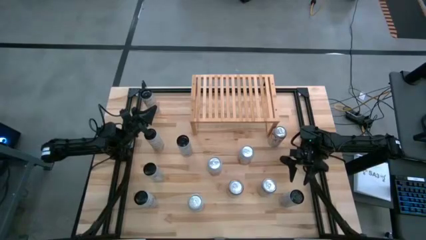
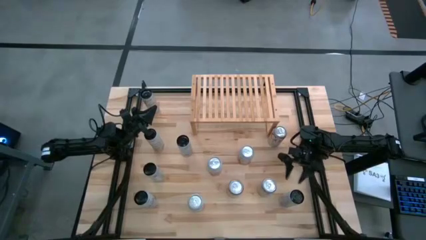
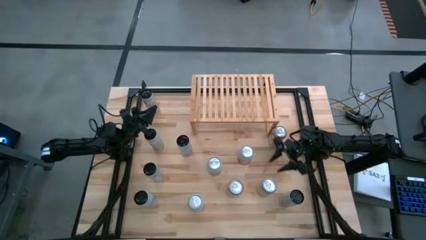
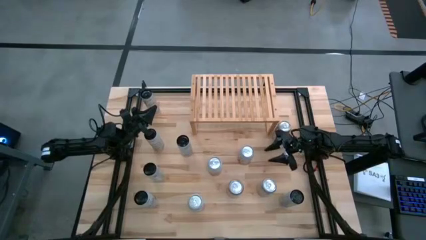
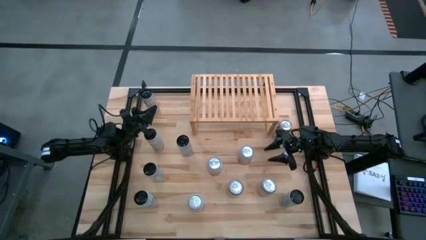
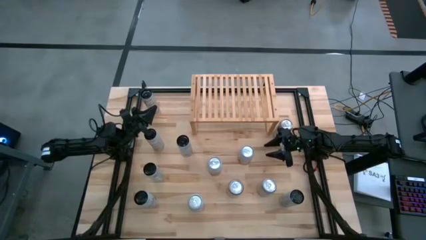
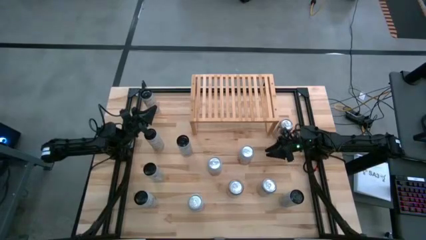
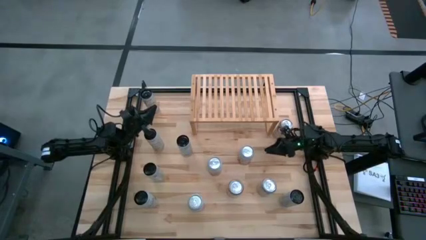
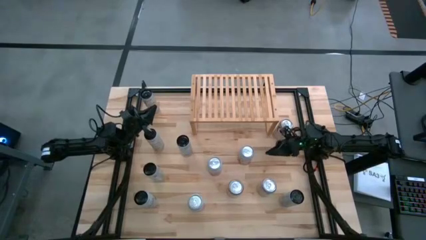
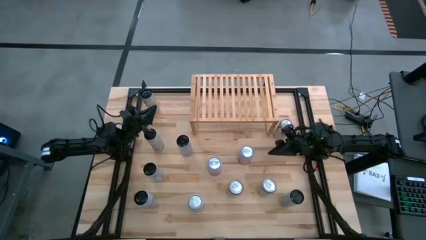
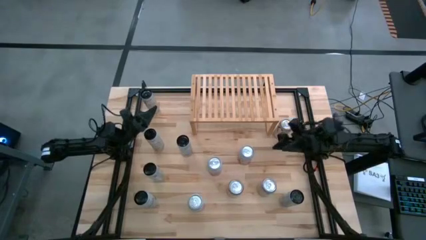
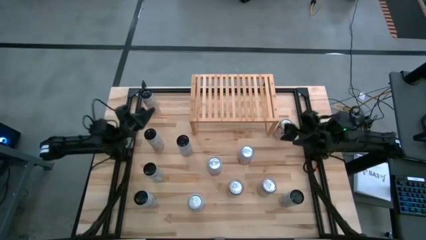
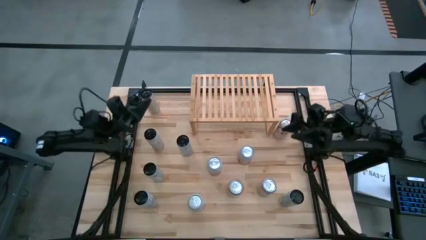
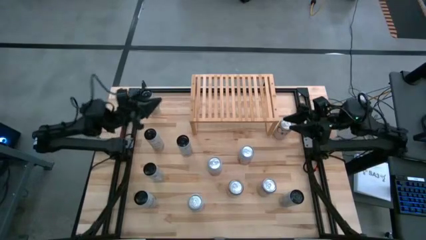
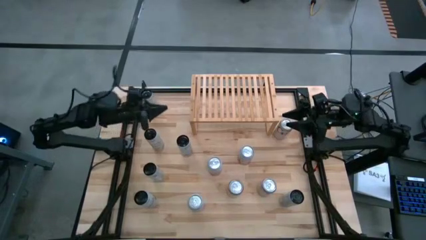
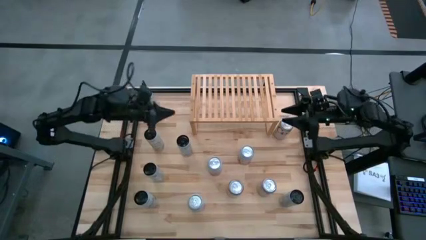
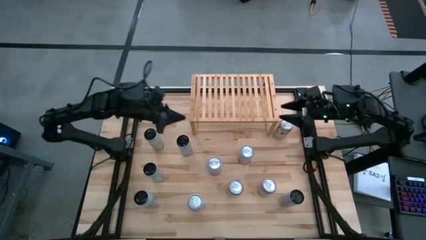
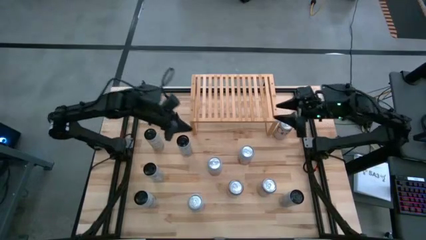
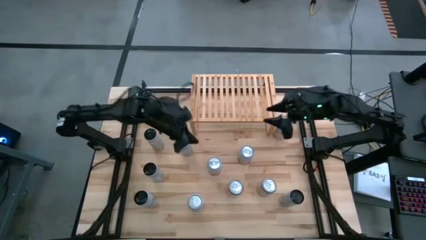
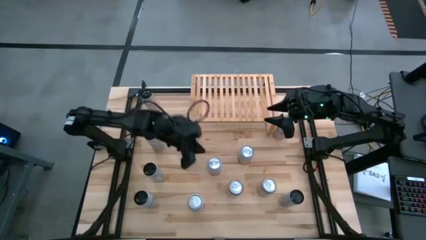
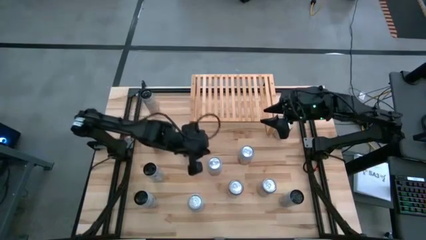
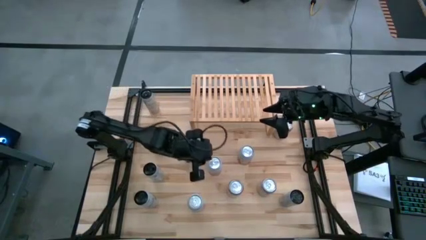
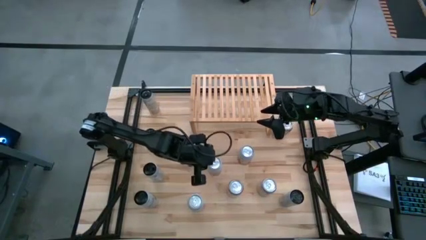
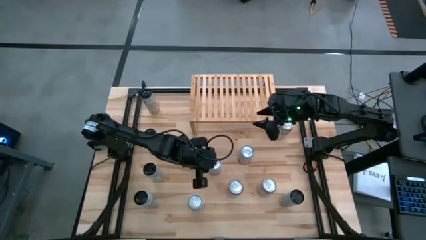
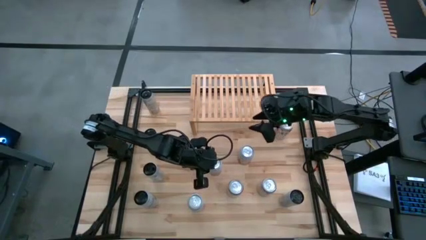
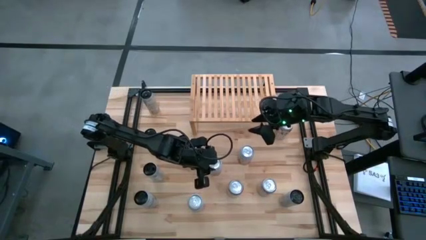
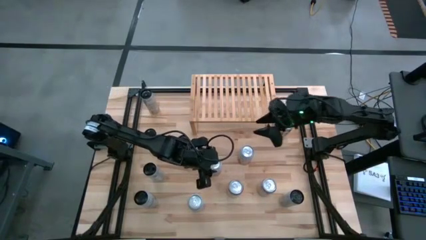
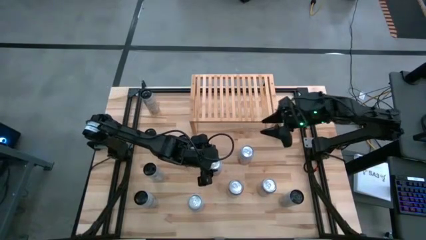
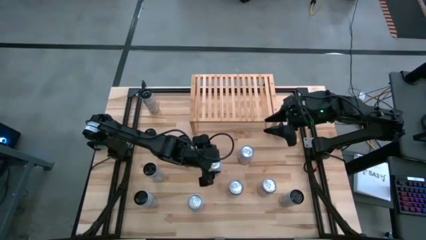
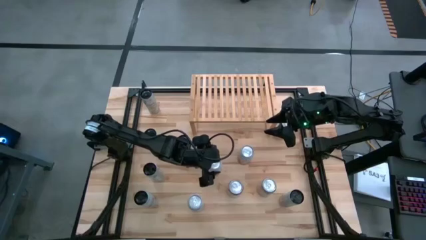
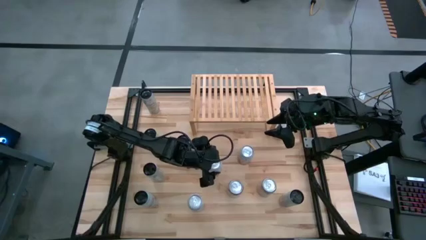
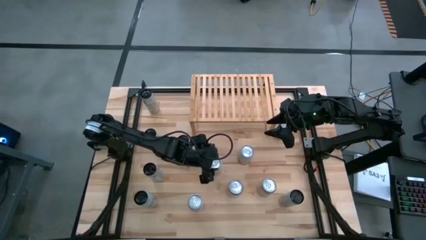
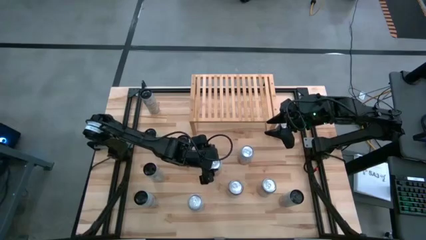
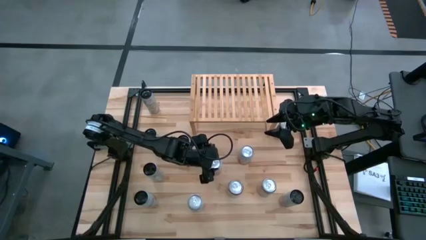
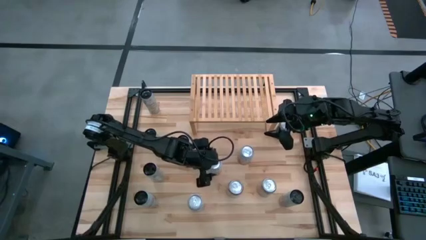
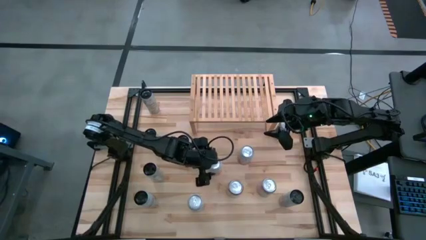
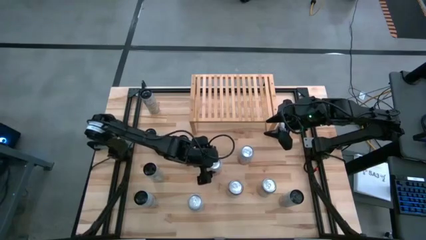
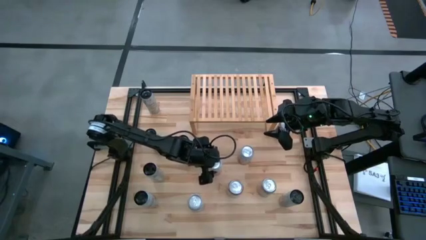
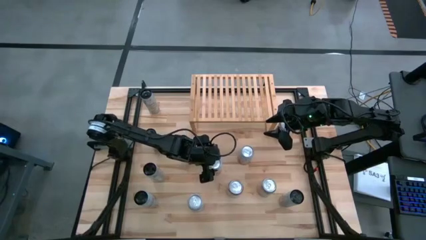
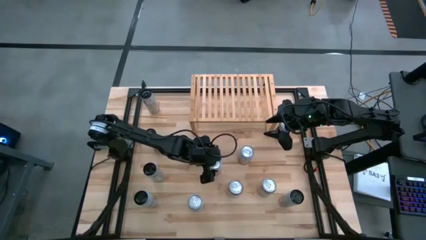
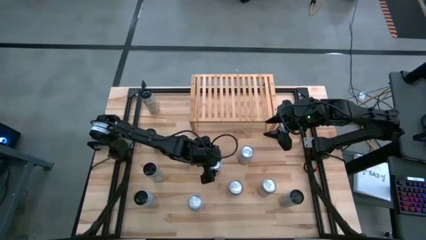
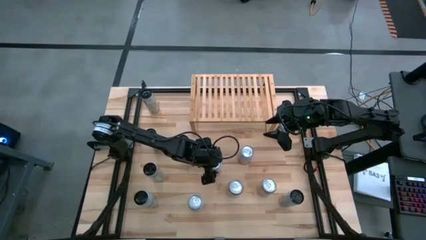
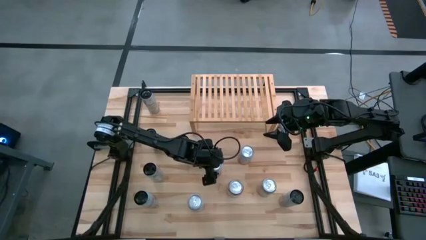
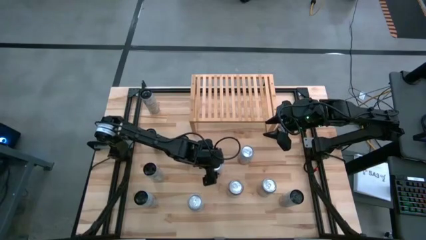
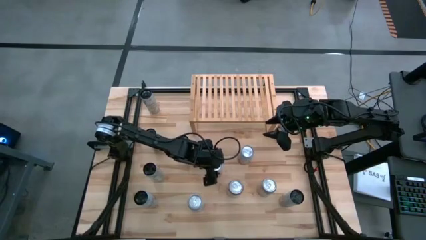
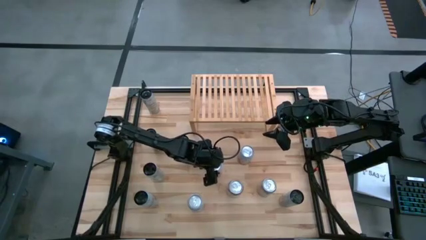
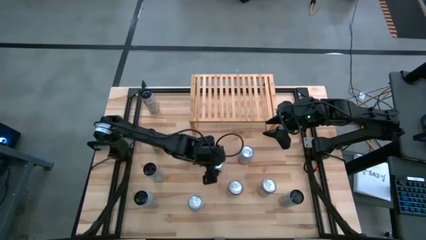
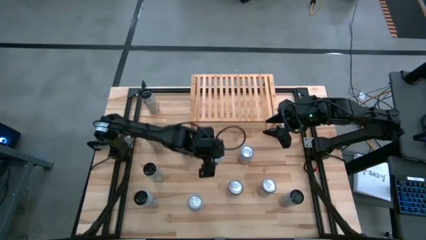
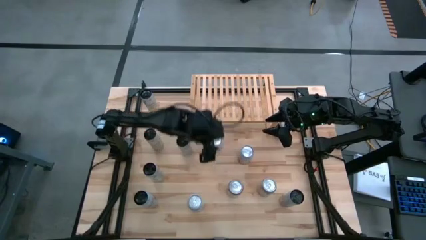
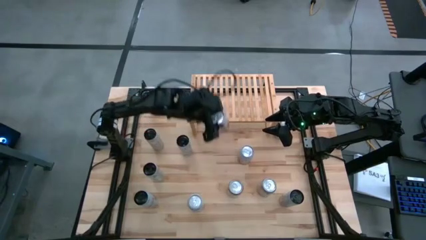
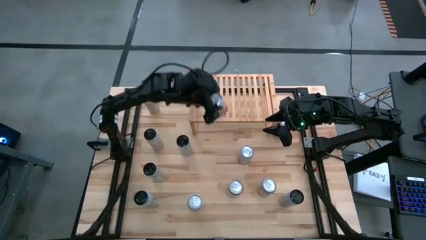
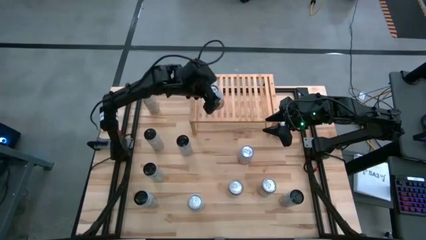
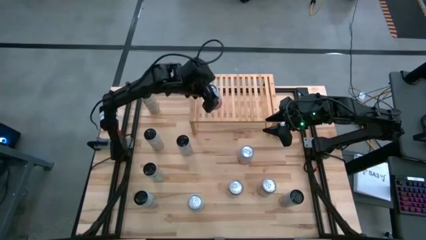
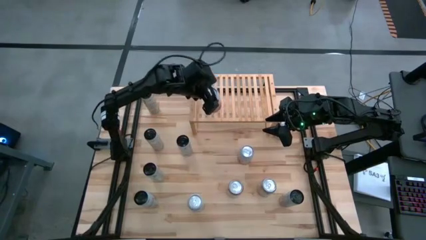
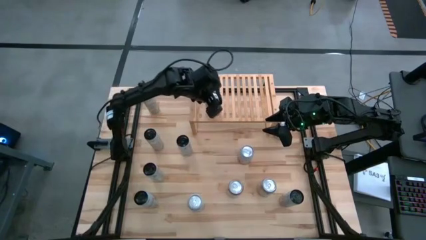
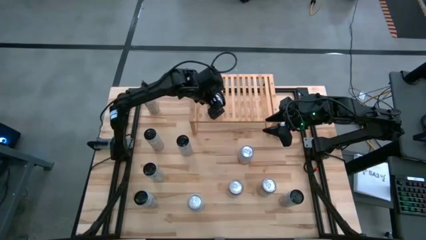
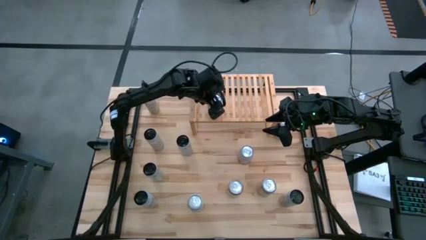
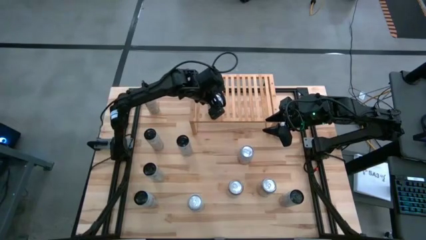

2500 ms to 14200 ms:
Task: Place canned beverage on shelf
Put the top pink and white soda can on the shelf
